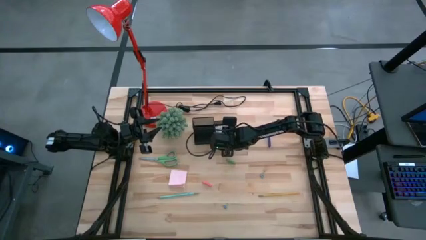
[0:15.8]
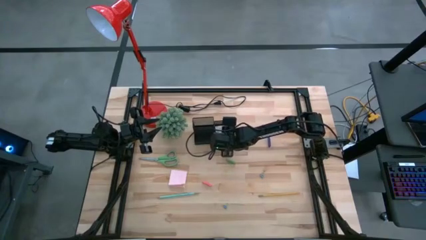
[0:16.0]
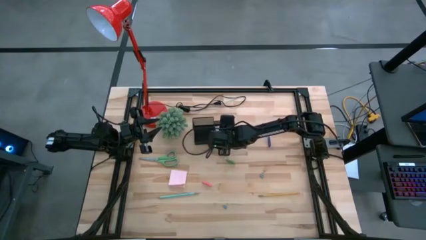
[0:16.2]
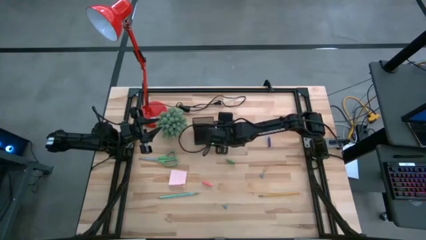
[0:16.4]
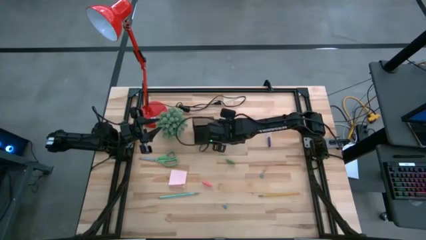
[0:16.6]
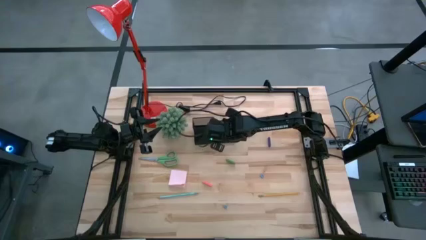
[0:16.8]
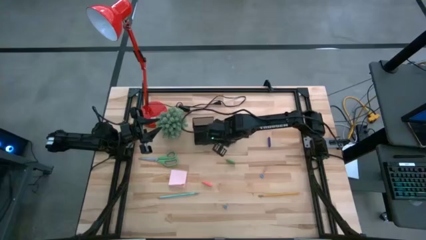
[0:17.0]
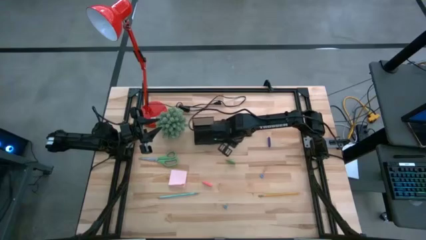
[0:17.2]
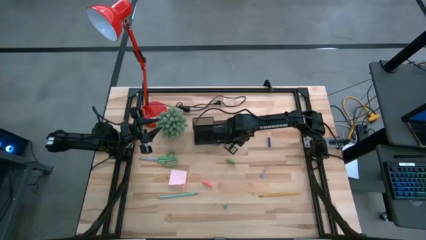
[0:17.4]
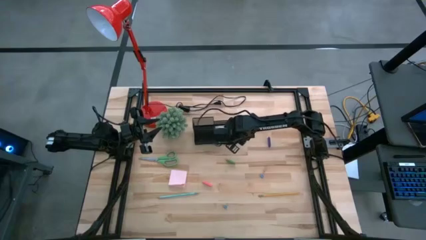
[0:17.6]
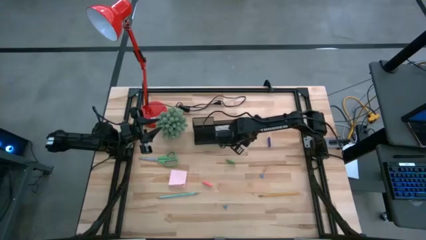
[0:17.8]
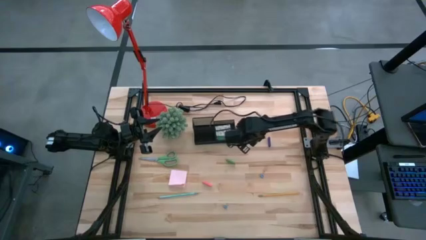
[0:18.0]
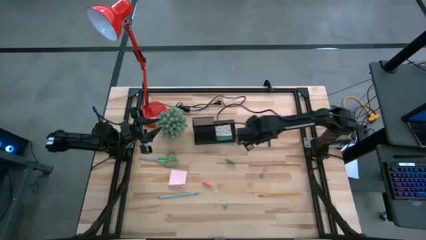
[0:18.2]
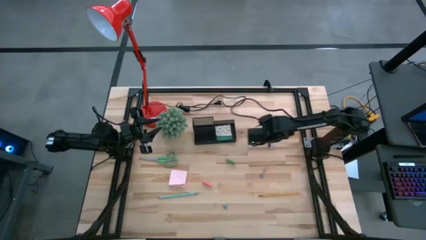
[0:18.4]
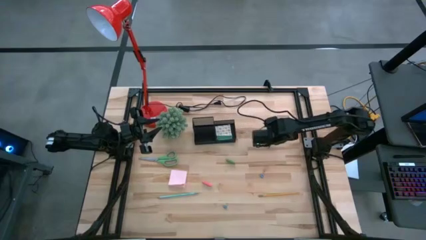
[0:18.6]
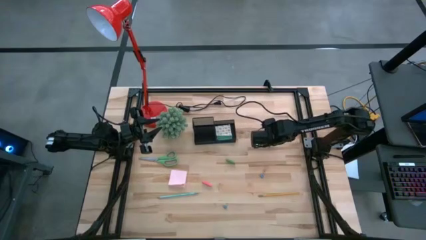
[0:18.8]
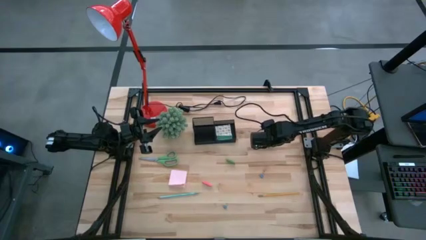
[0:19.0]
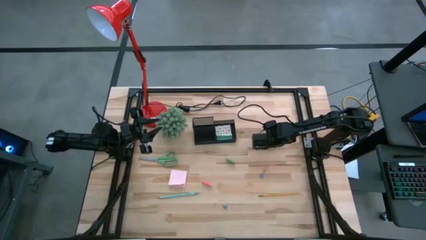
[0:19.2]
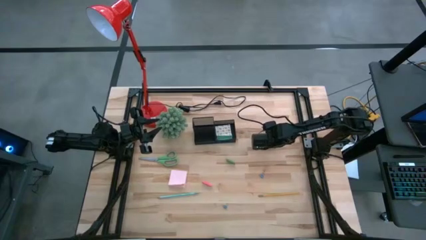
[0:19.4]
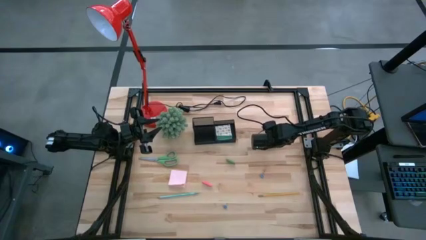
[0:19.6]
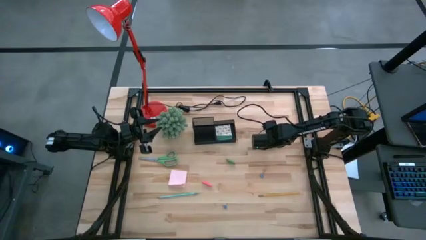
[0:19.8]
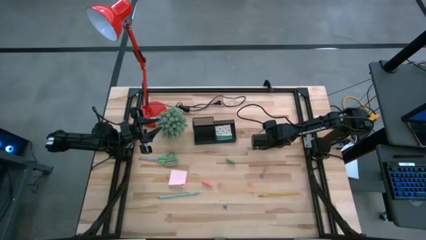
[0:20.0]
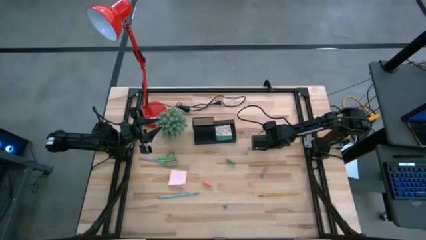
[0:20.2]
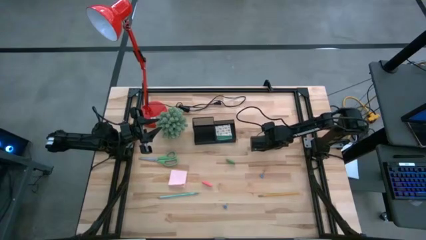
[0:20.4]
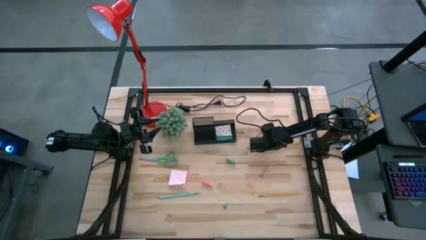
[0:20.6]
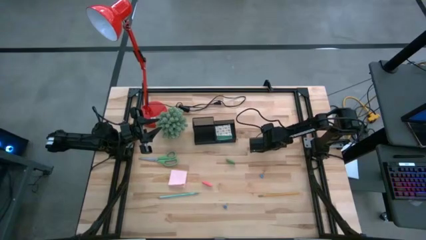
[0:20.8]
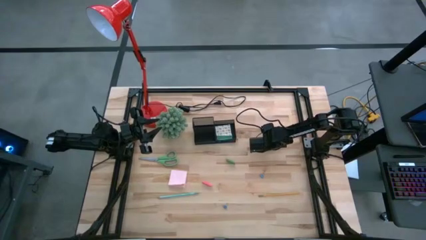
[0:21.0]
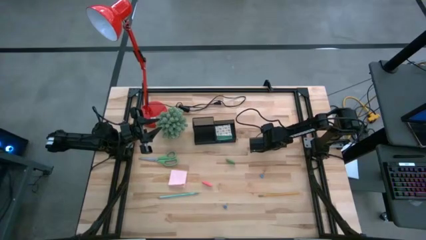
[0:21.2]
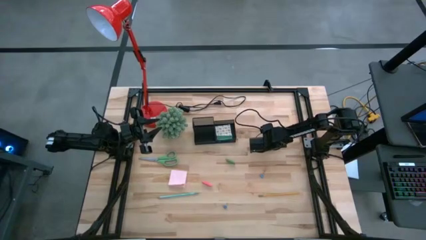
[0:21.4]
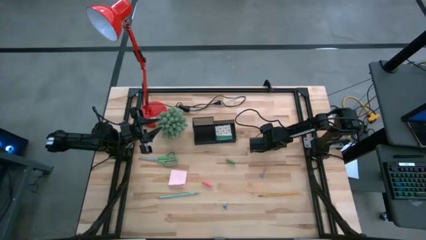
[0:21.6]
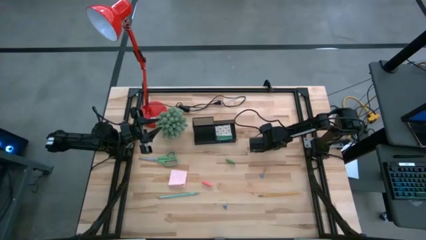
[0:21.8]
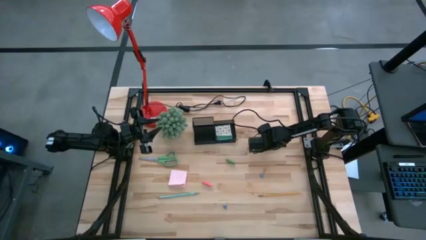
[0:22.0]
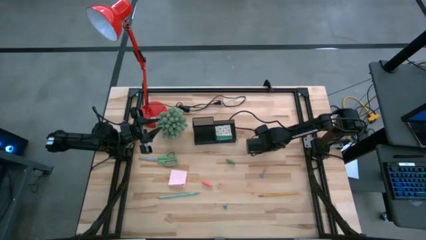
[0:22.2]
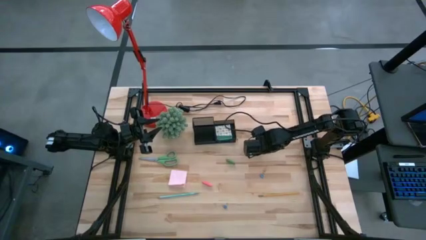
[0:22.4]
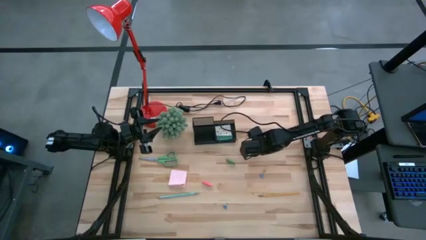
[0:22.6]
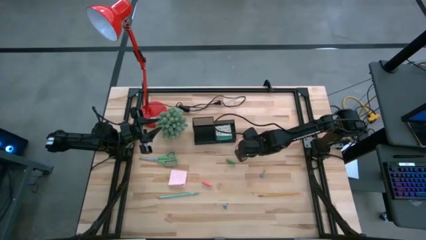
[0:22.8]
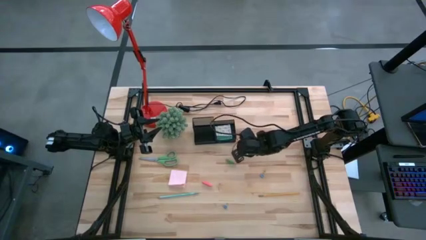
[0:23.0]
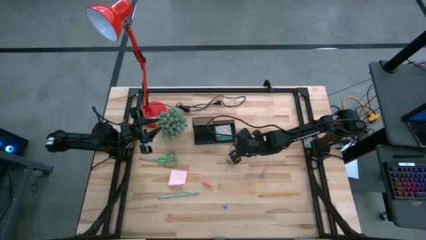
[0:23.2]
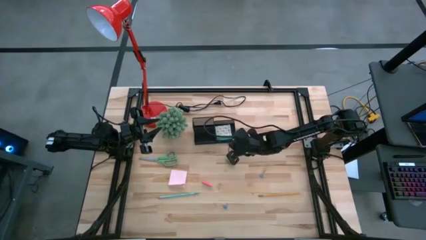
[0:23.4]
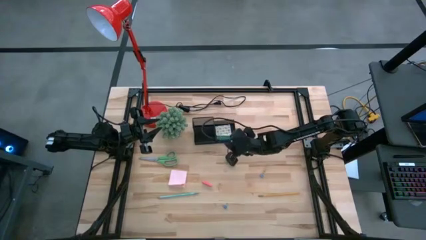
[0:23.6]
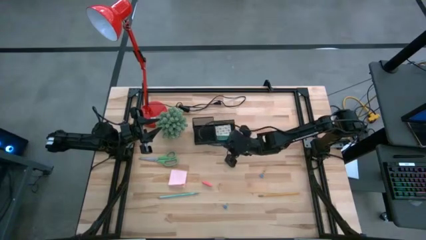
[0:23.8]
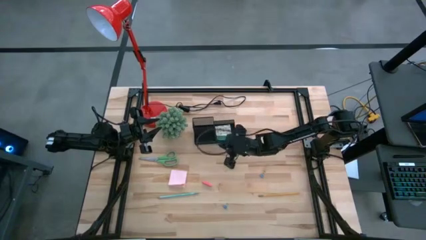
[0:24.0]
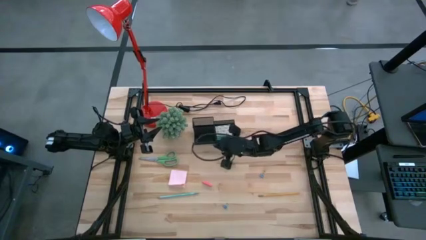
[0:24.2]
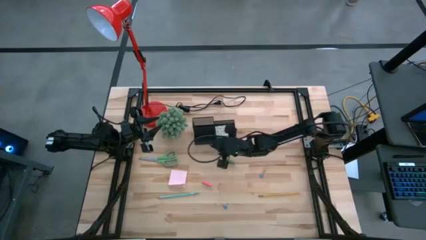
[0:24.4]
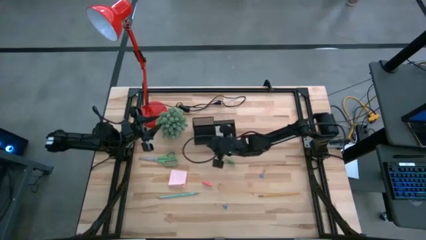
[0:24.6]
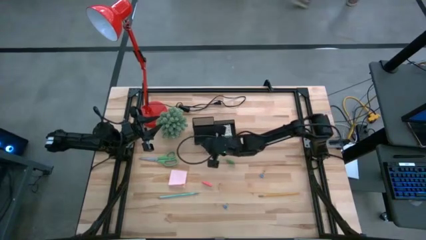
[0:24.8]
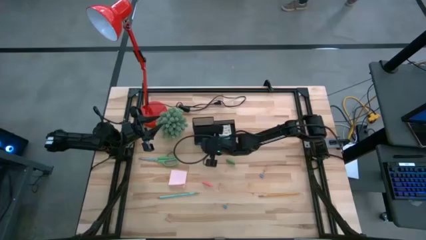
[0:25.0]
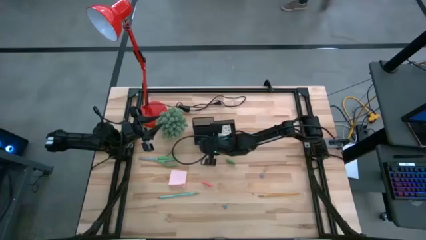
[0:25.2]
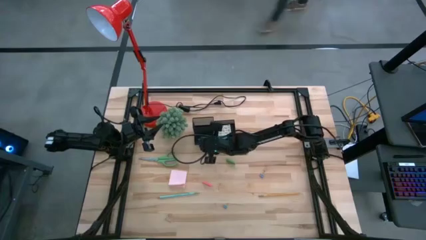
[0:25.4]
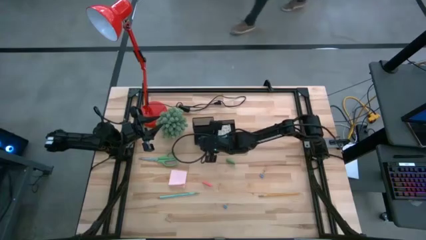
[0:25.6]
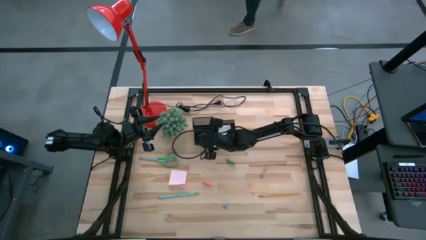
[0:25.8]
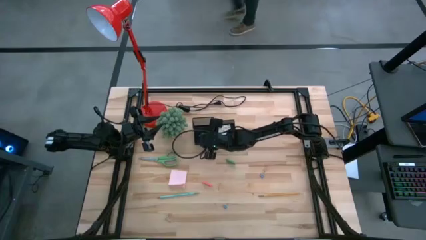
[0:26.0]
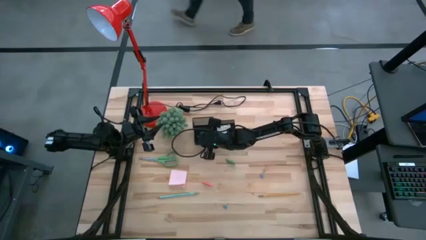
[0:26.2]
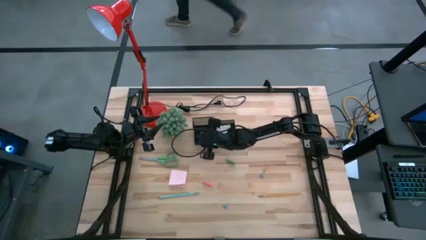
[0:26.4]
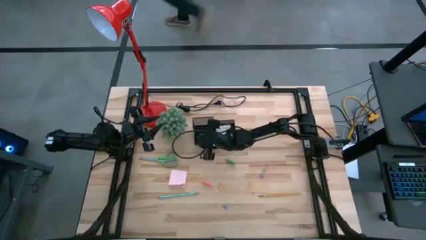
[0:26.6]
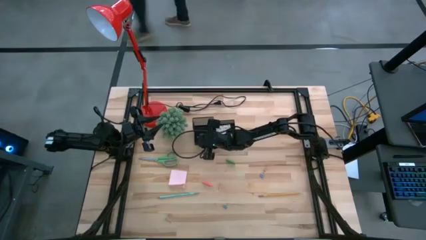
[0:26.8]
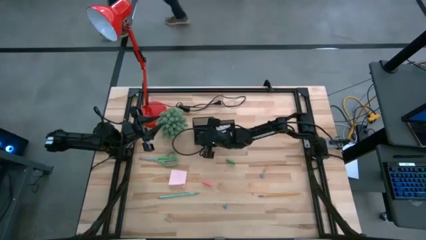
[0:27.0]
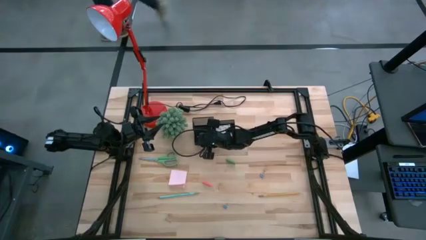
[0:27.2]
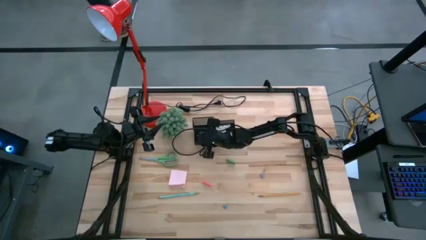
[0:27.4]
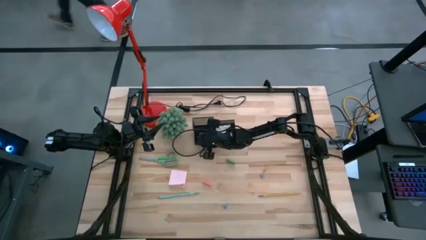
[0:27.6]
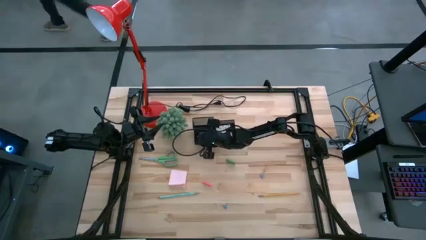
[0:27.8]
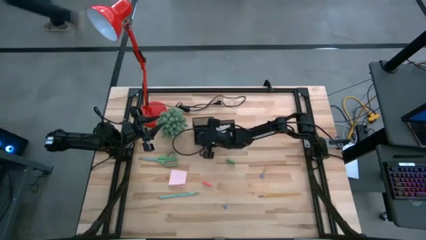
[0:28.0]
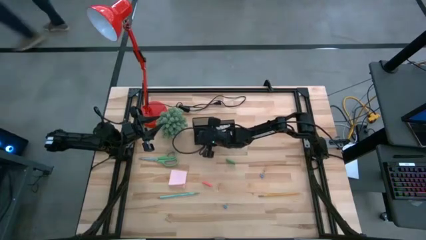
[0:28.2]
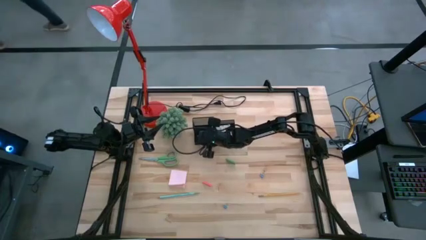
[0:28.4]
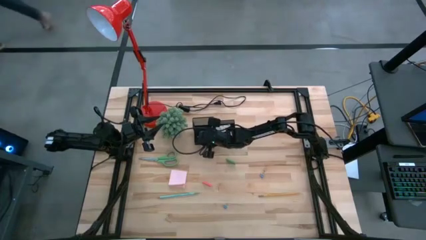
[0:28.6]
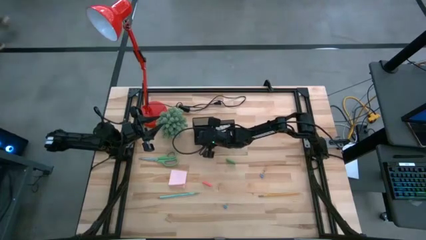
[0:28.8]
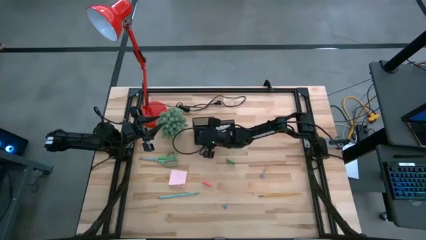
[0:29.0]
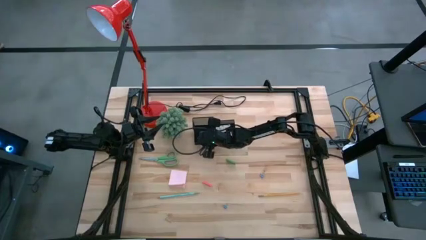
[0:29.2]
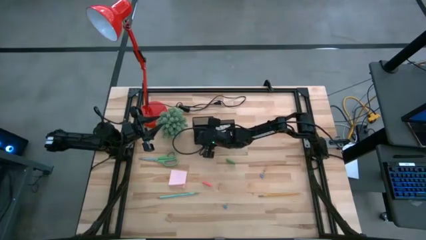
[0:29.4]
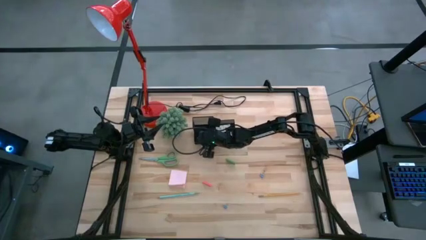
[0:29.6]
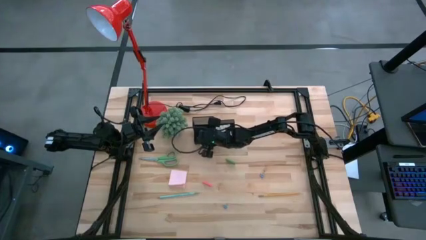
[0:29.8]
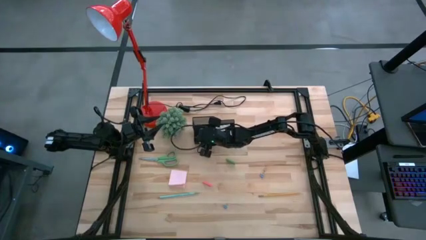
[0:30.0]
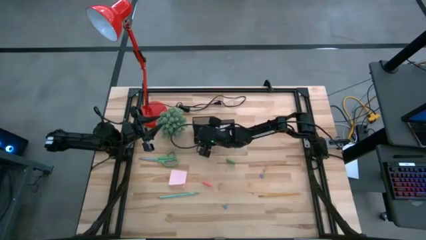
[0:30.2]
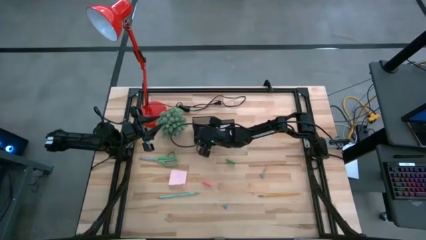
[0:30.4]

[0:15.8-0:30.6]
Task: Pick and place office supplies into organizer
Put the blue eraser into the desk organizer

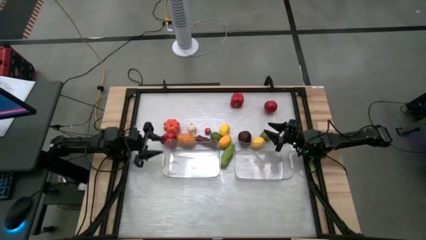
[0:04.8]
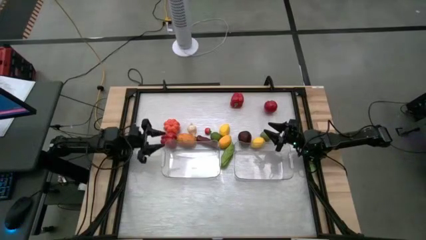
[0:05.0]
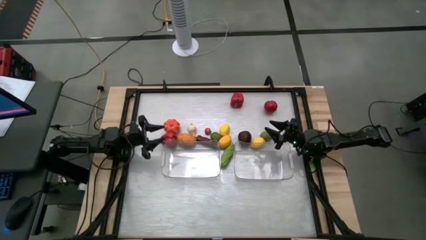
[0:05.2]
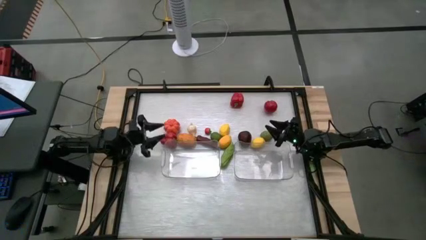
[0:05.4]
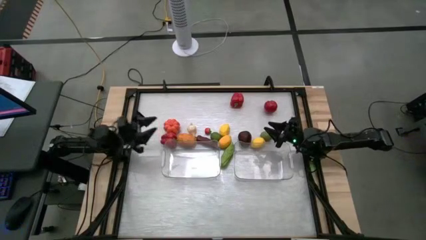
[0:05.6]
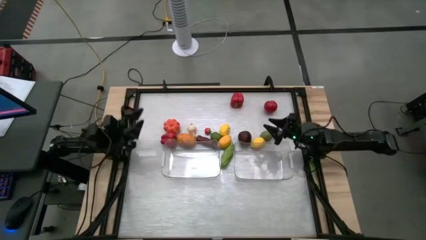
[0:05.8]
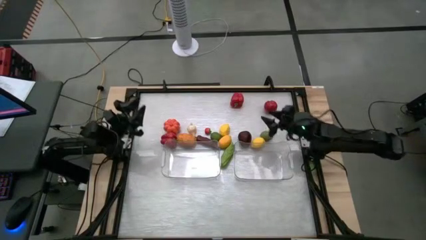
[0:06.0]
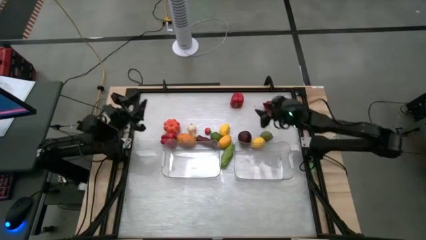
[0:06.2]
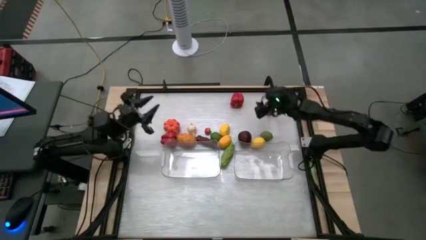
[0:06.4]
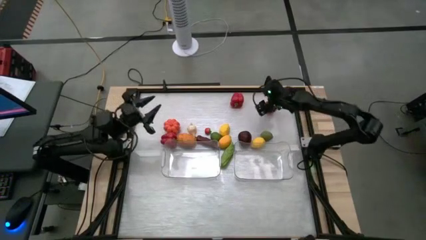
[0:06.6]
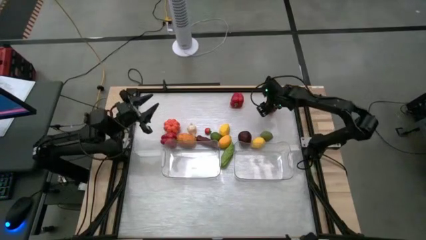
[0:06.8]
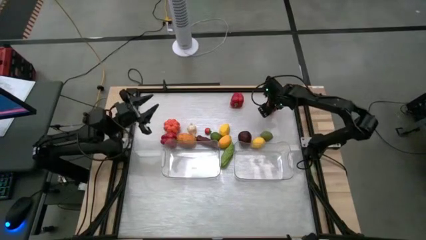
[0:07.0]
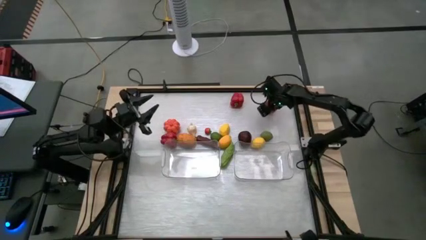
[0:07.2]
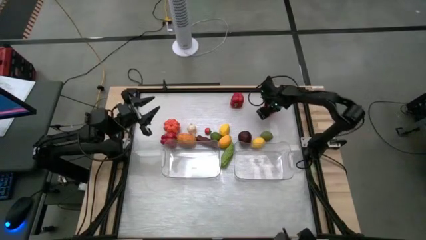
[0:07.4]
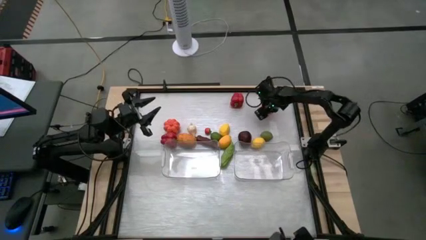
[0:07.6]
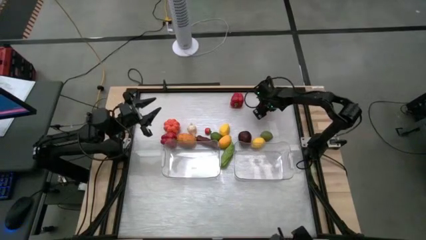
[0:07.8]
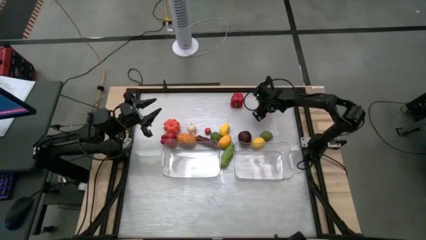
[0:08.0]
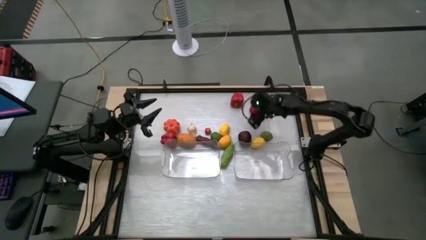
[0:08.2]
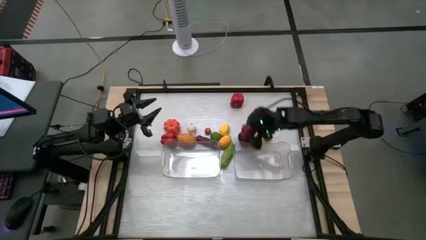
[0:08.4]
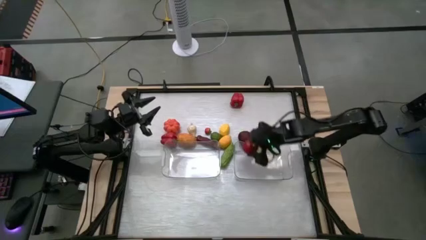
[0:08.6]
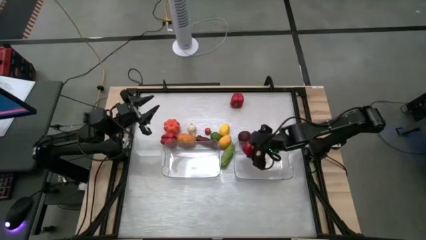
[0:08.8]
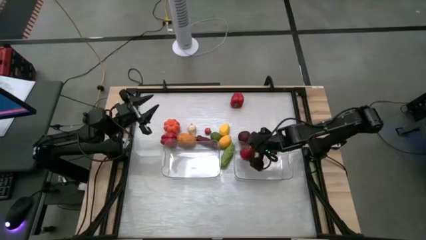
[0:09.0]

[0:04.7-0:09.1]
Task: Sort produce into baskets
Put the red tomato into the right transparent bin
